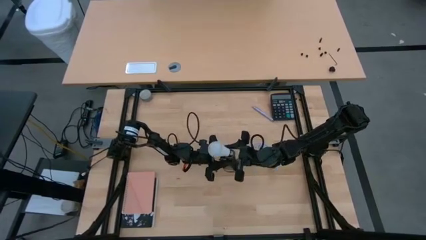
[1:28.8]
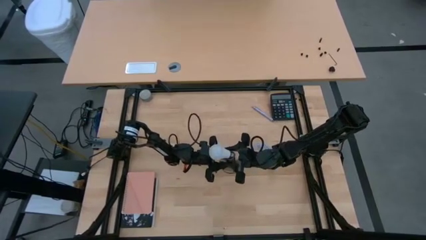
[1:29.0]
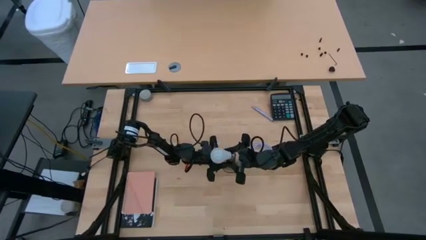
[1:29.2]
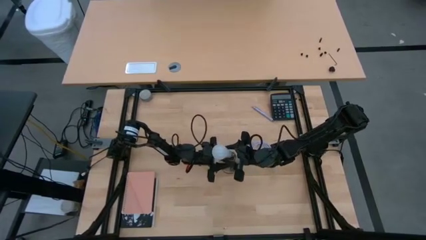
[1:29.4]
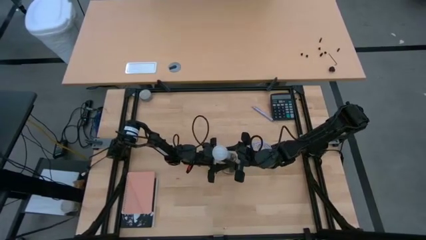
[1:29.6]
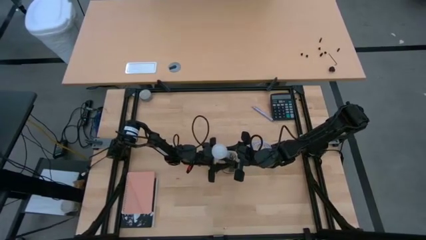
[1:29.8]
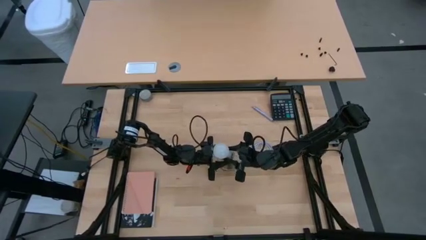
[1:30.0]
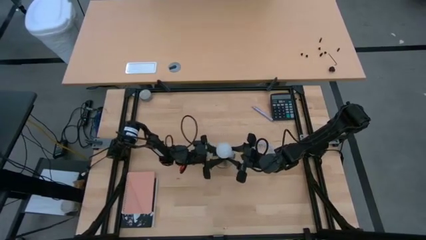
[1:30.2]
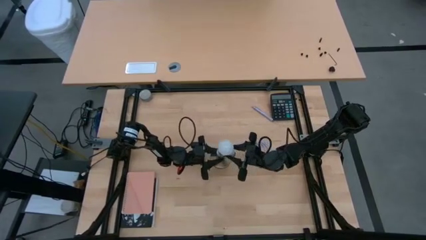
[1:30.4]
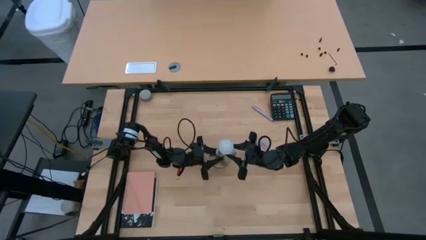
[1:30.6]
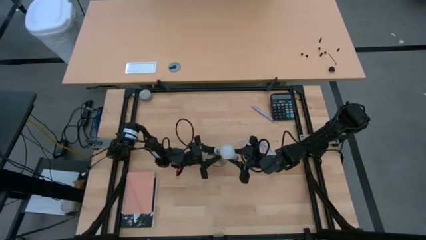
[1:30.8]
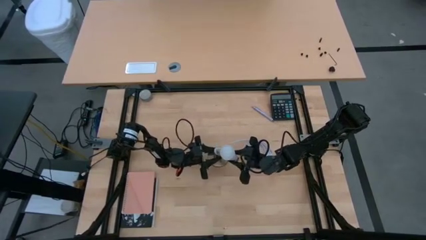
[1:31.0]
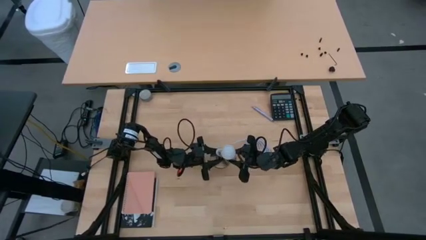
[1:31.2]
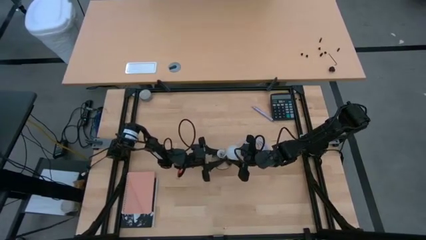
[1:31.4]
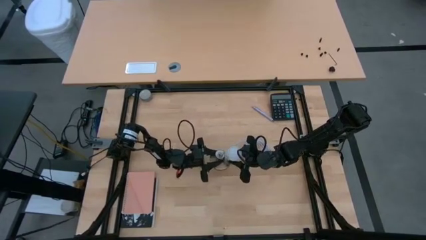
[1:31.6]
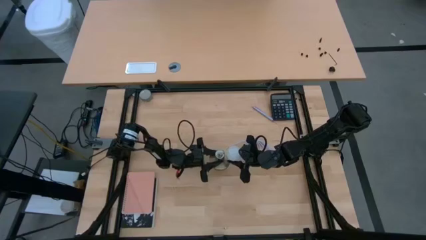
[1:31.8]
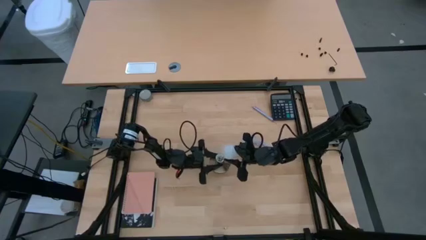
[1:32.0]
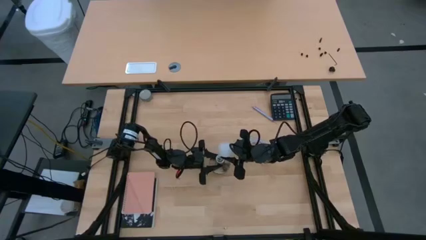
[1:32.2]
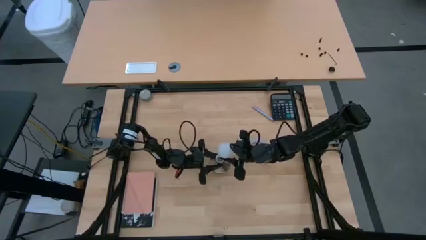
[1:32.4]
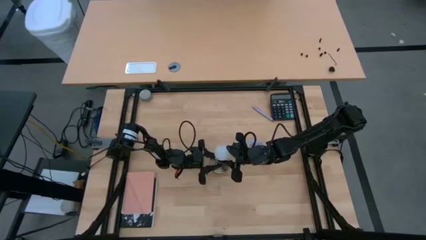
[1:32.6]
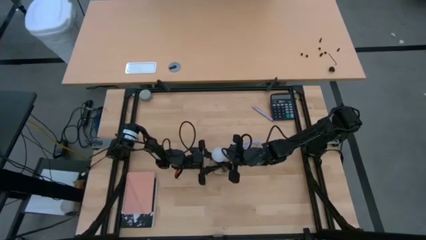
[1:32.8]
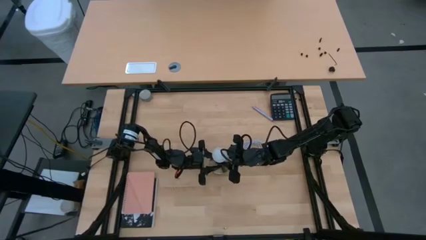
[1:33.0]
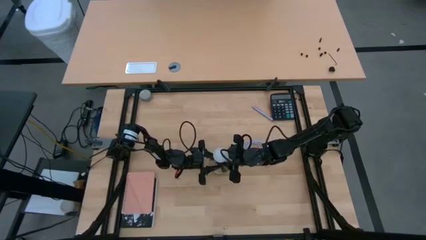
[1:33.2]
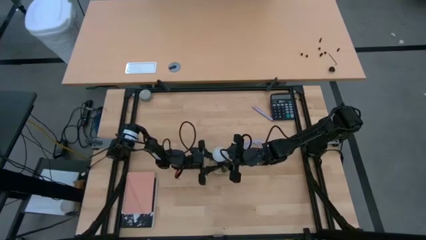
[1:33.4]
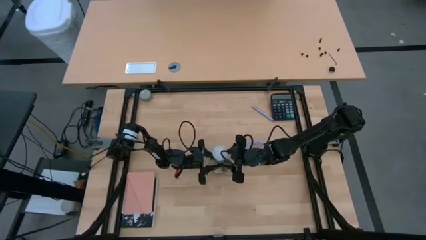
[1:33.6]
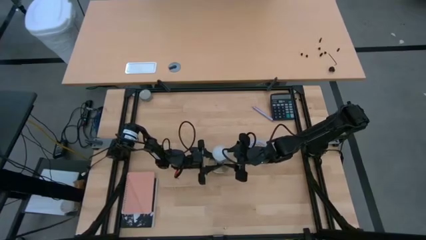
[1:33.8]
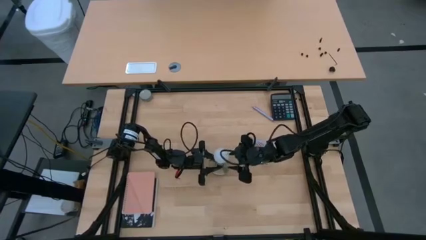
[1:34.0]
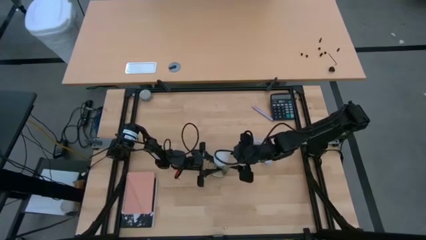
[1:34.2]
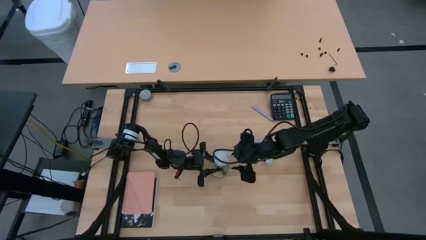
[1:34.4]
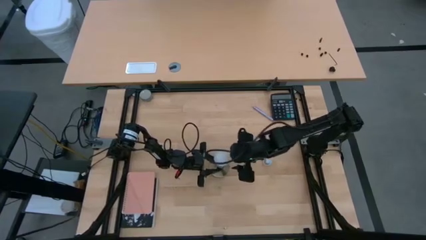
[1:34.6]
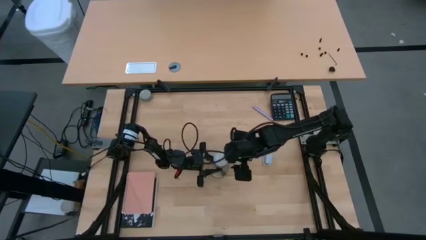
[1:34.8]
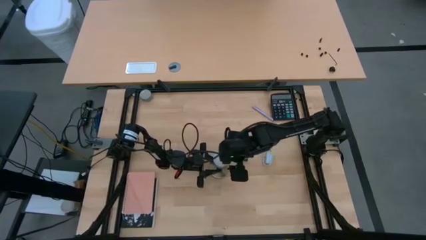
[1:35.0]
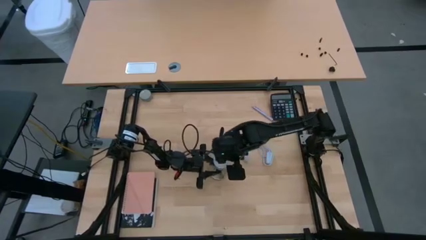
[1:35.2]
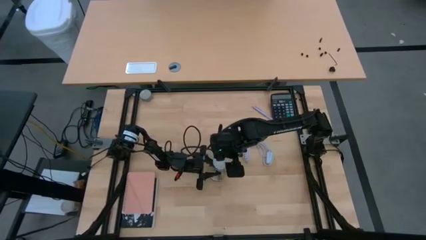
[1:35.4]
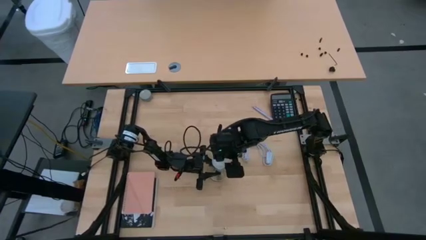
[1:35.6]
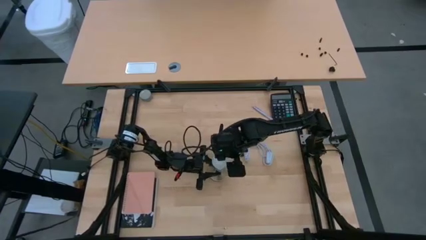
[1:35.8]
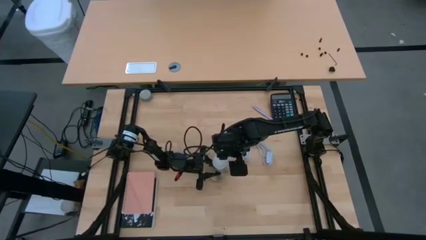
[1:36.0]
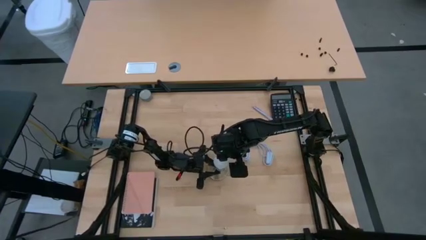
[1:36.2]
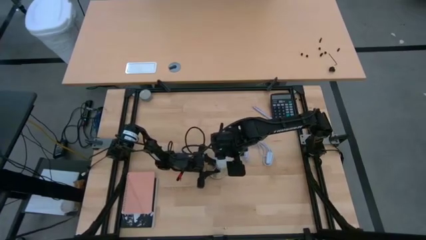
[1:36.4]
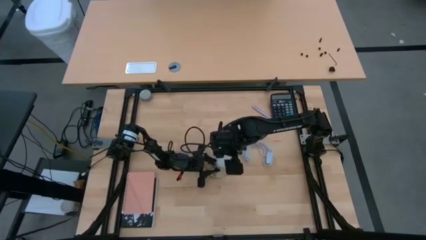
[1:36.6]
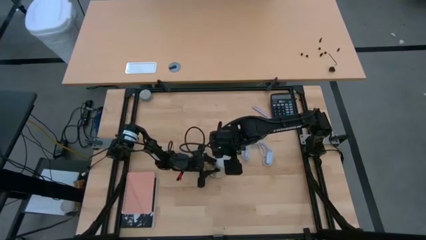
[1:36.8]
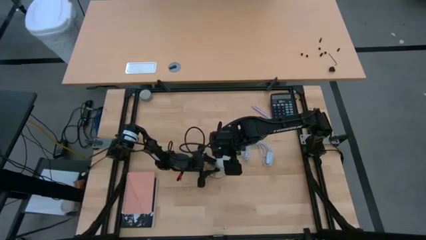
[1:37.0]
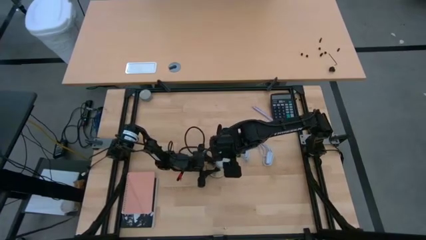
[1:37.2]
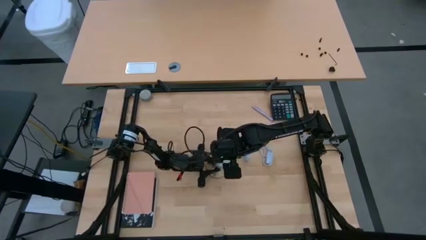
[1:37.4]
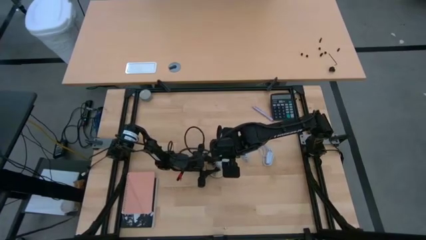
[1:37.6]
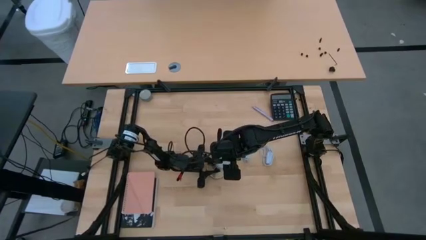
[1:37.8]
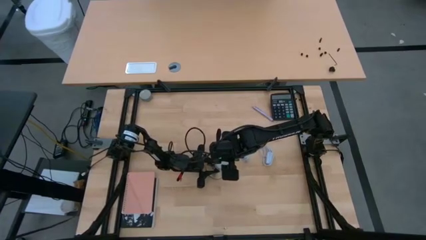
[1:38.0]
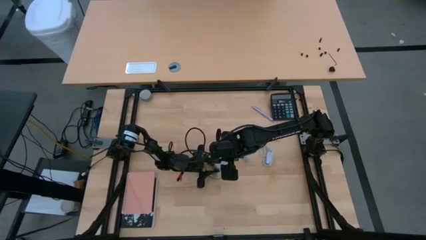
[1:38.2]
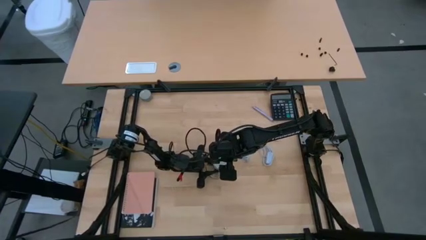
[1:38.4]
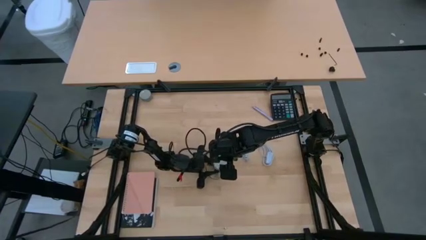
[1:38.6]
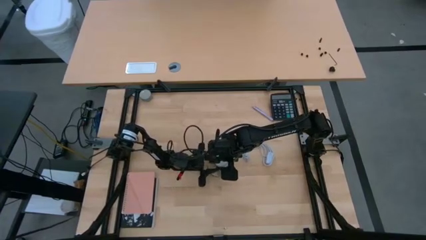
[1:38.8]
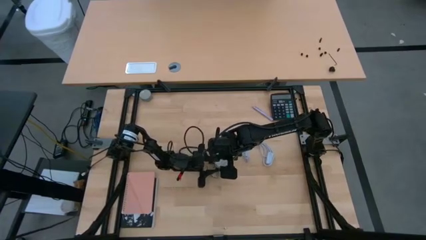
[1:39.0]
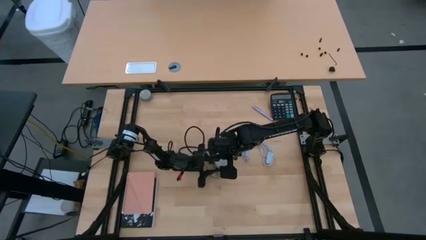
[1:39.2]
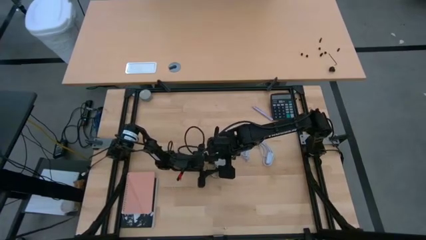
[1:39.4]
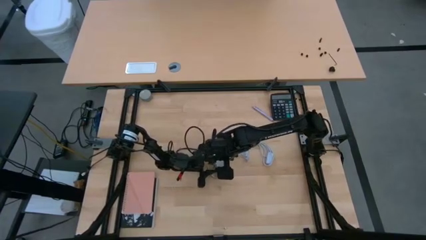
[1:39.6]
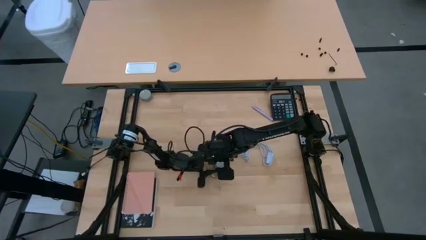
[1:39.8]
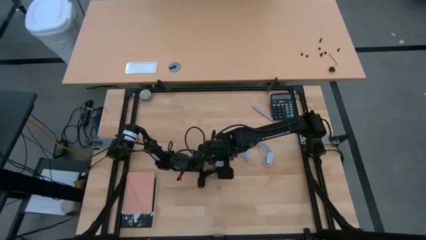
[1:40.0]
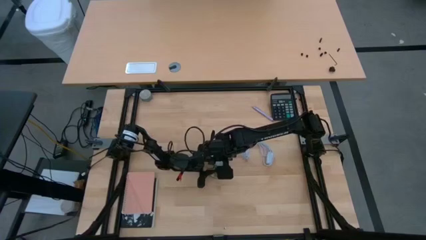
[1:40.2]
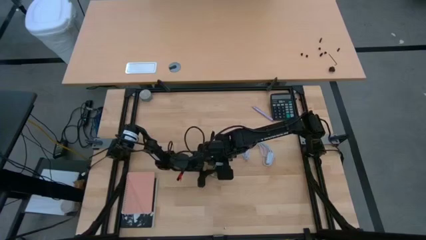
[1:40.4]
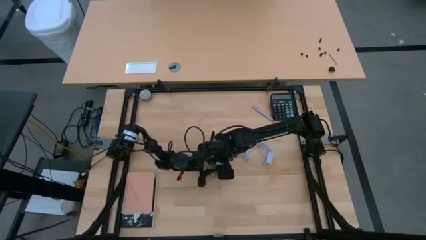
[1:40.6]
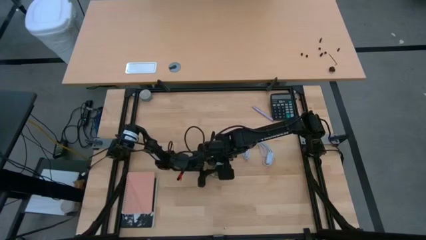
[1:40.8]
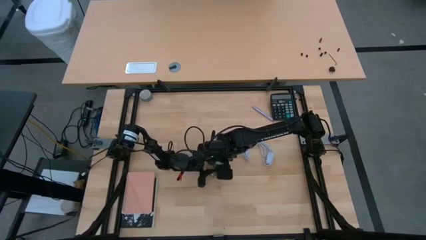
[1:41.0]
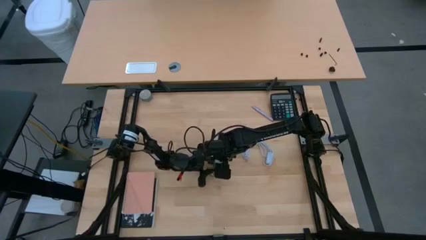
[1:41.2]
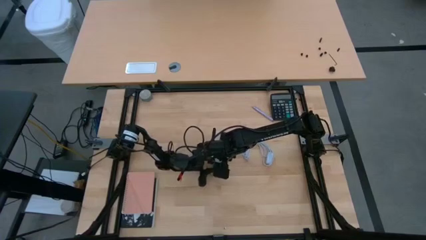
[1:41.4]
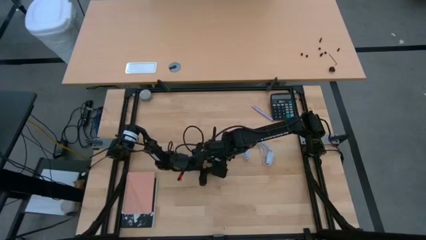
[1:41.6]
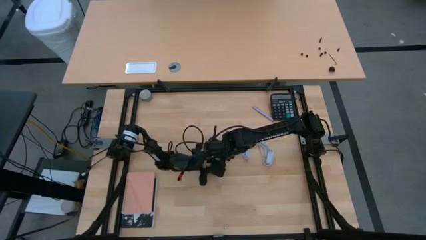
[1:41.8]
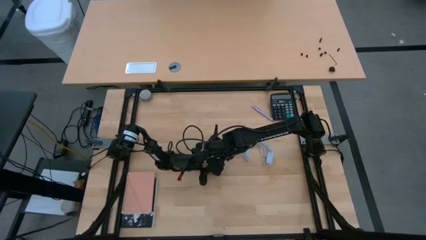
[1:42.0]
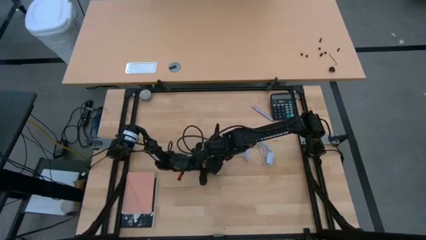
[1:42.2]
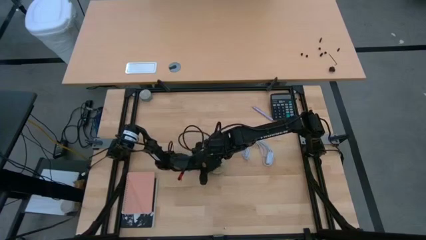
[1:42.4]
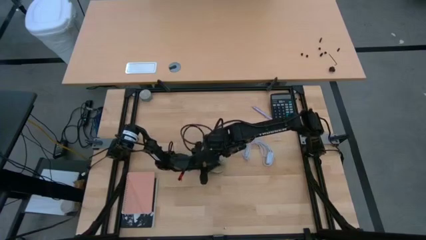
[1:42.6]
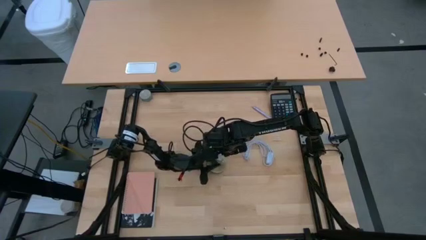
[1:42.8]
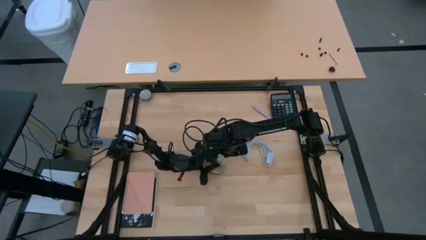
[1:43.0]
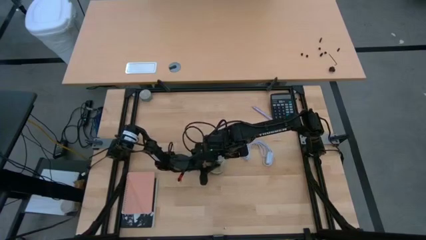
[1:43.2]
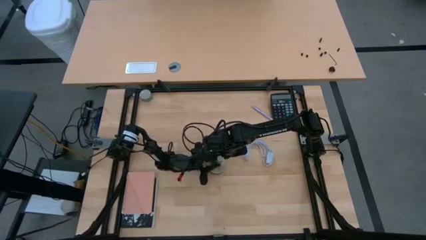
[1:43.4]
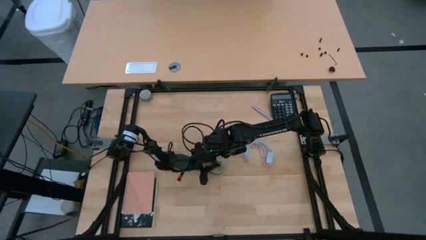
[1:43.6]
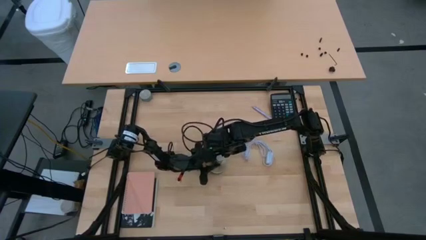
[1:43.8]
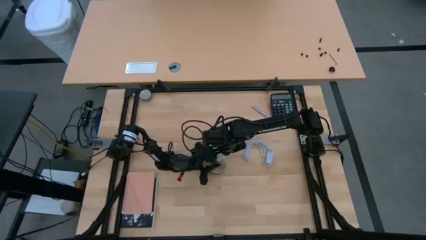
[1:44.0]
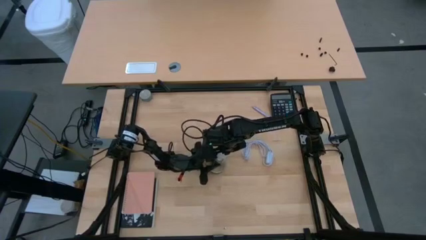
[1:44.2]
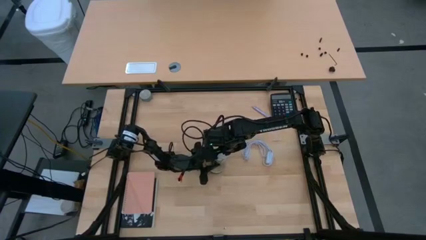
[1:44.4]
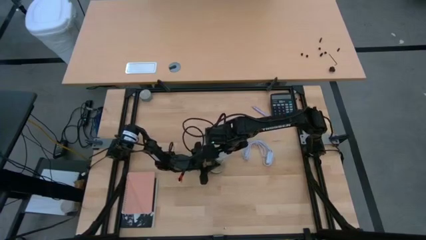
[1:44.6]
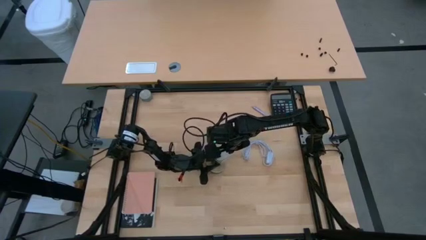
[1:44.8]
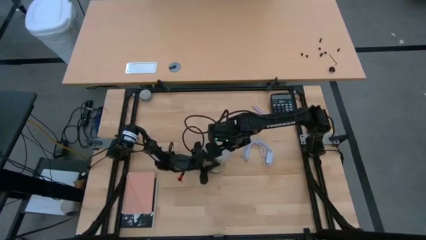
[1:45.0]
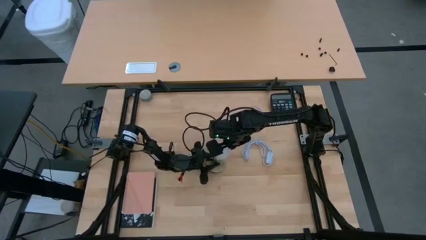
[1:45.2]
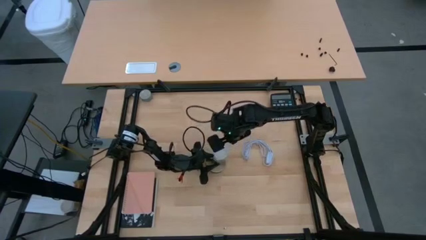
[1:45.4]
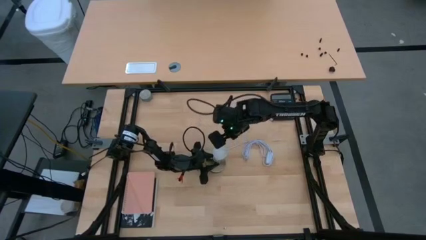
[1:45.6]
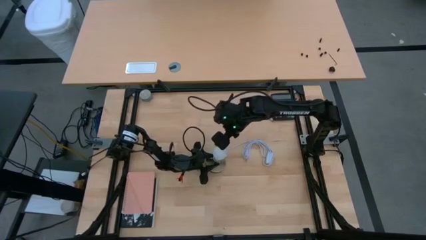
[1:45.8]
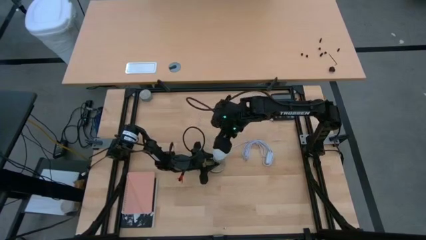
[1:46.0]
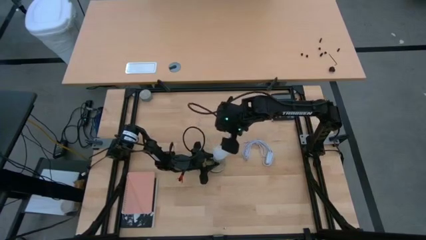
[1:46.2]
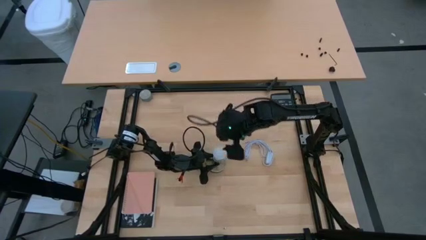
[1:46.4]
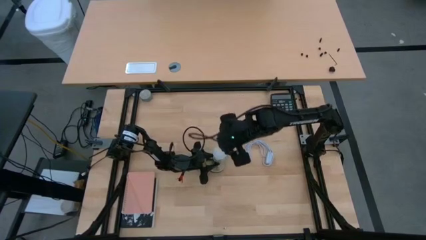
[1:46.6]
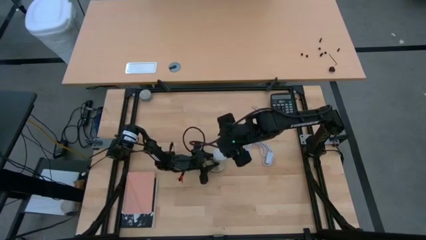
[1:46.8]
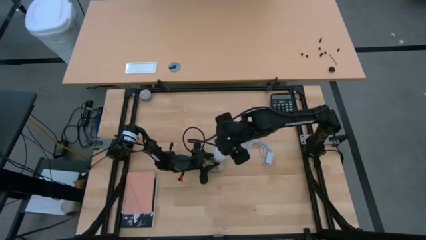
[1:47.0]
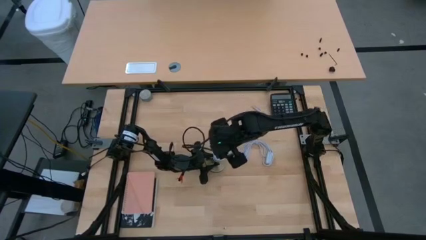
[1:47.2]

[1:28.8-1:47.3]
Task: Screw lightbulb
Insert the lightbulb on the lamp
